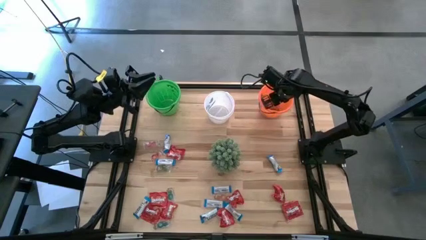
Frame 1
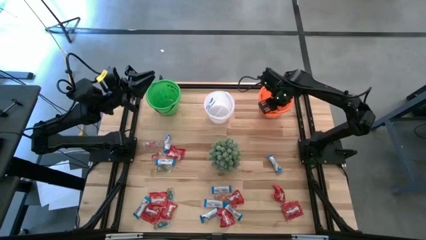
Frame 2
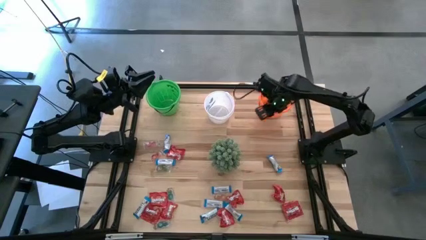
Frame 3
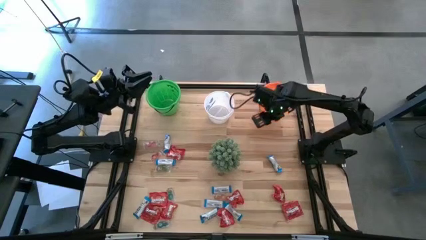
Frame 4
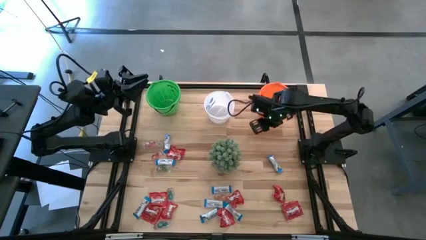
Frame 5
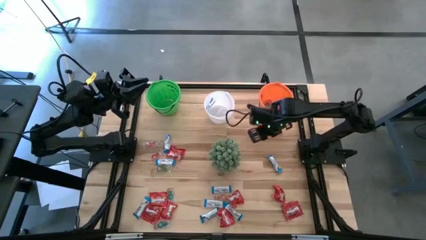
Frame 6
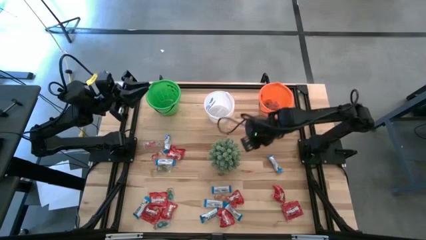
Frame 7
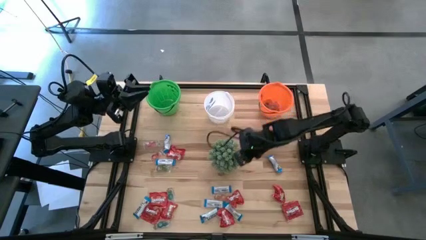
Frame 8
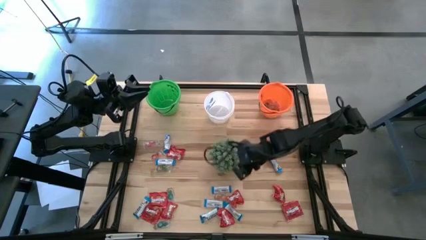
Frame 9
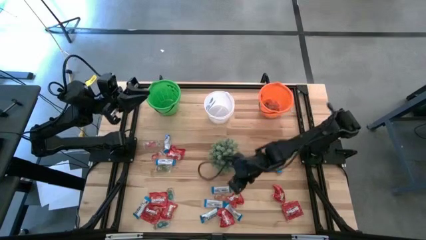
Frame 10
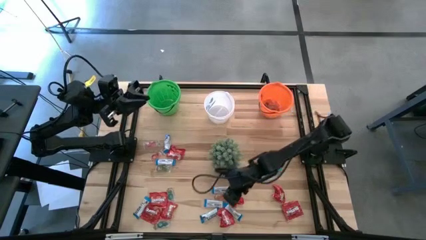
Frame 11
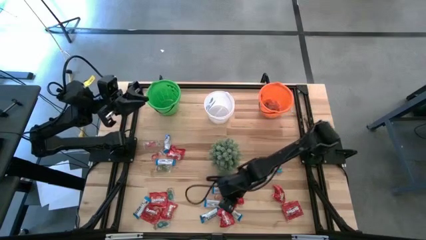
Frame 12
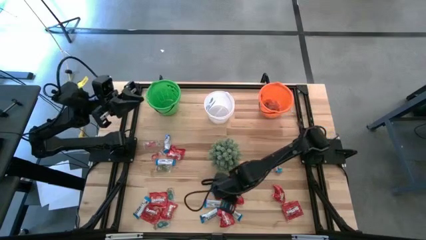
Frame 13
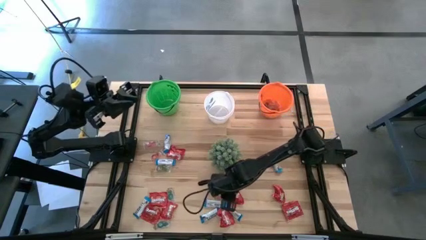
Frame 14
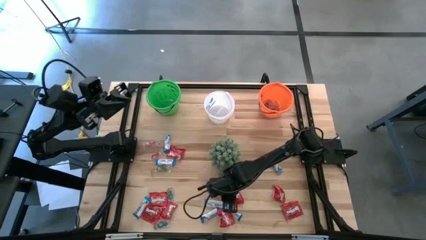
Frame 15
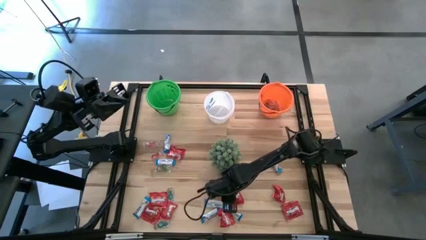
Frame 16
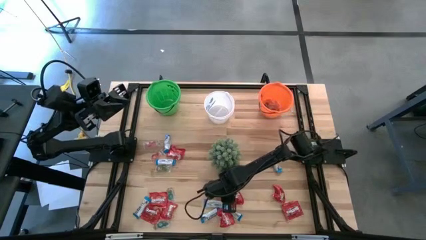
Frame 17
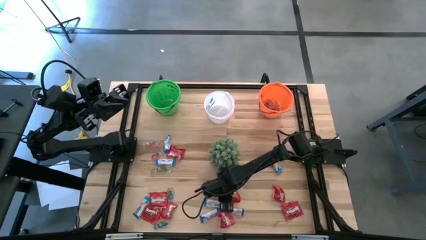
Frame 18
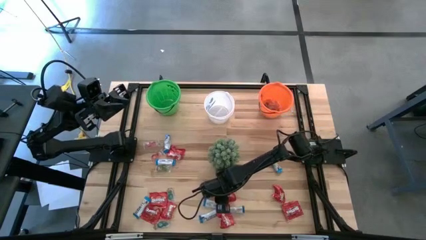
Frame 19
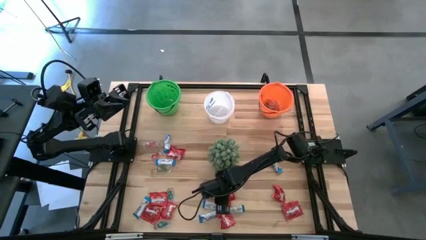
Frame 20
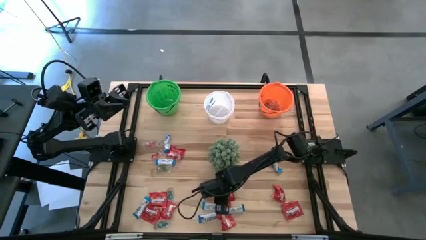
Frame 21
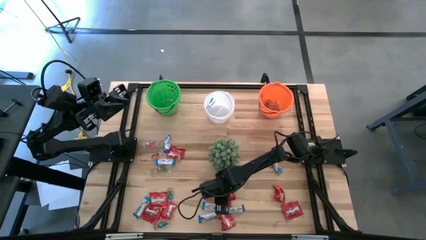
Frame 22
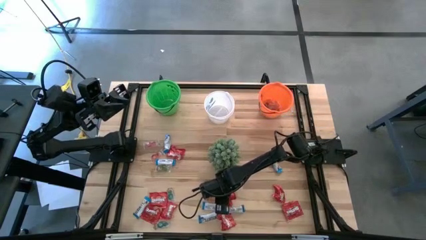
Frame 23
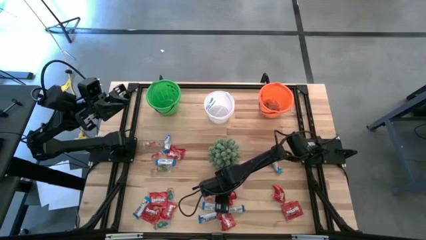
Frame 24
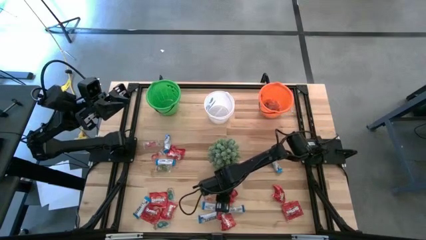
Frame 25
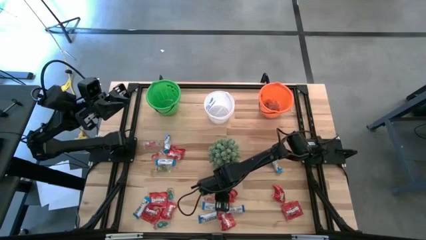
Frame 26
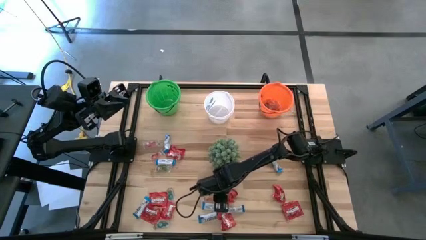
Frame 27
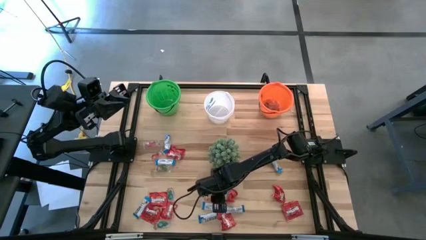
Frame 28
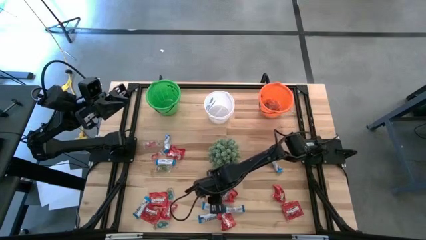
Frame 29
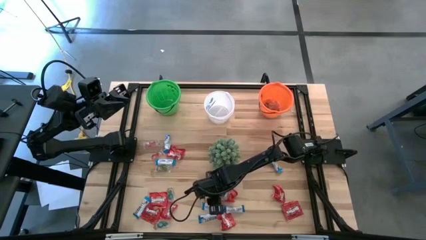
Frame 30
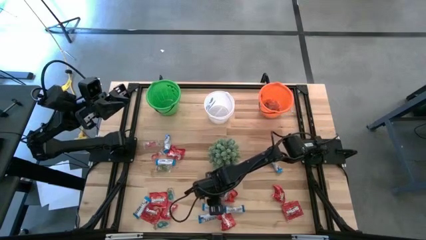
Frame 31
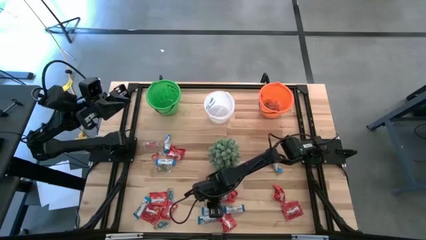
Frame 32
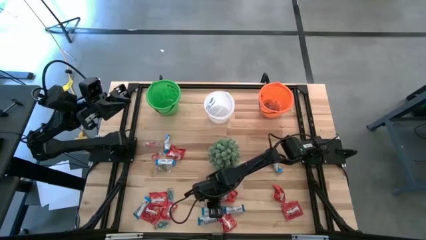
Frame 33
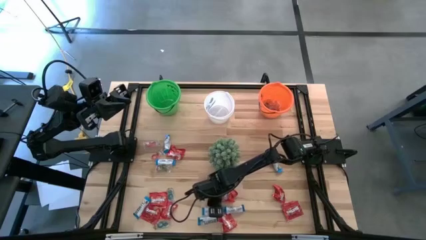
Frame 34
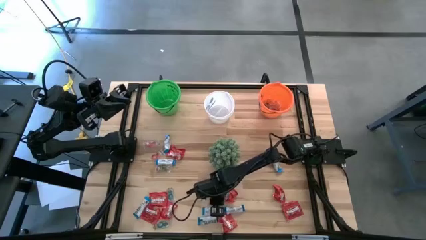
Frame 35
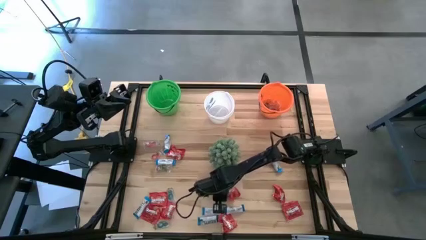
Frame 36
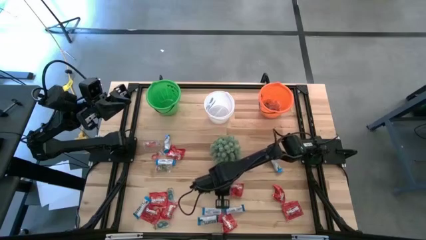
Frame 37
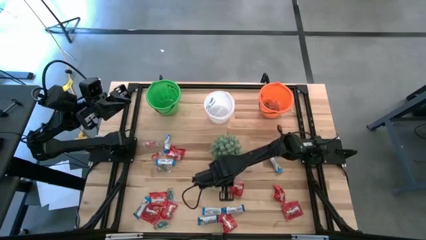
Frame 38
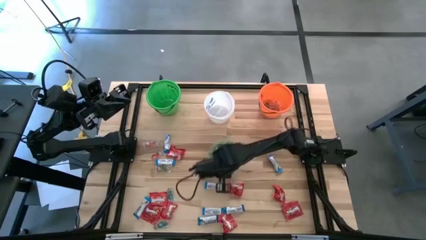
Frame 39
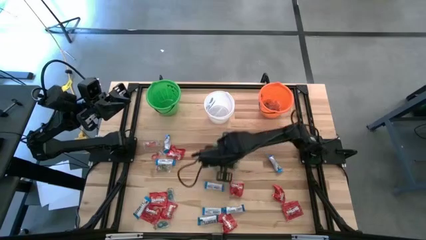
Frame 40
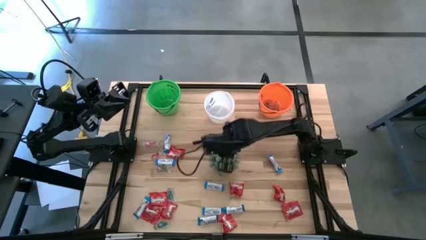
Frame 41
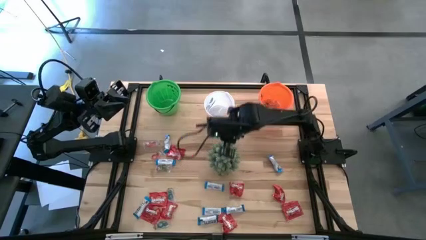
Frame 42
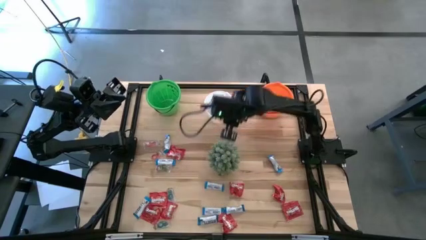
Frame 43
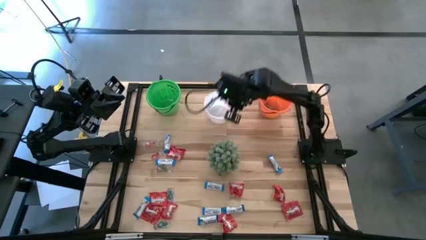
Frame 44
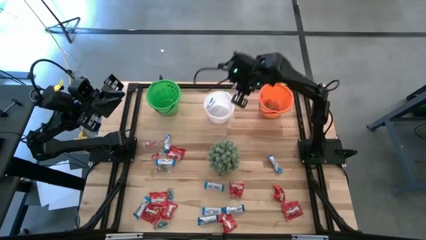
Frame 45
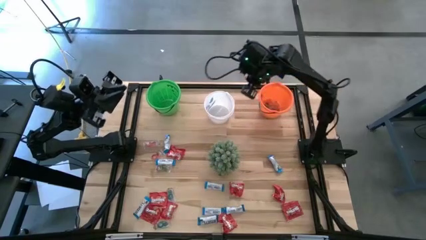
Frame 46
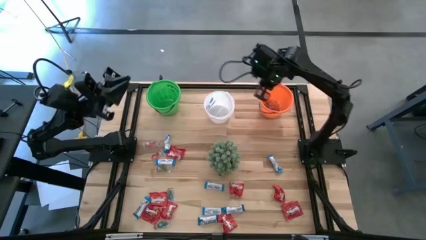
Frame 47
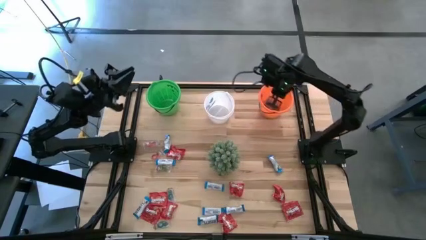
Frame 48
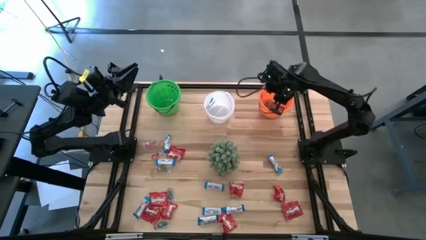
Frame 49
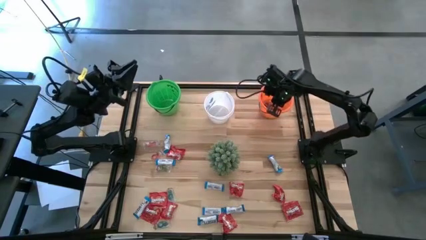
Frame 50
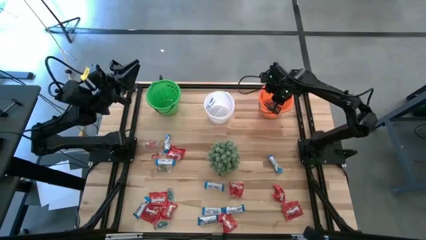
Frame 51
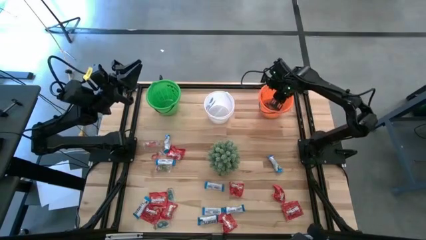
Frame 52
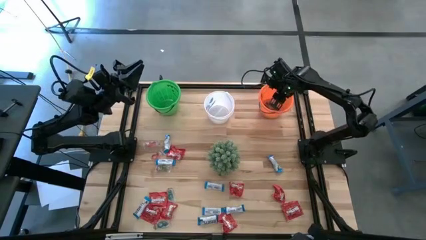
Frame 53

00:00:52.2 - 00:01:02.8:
Task: Sort candy
Put the transparent candy into the orange bucket

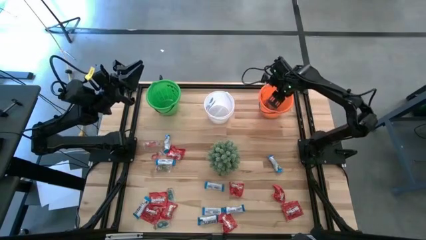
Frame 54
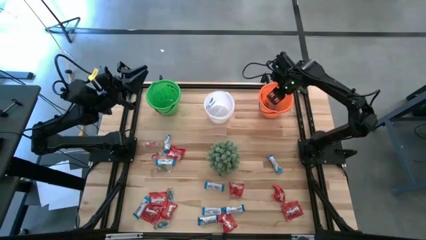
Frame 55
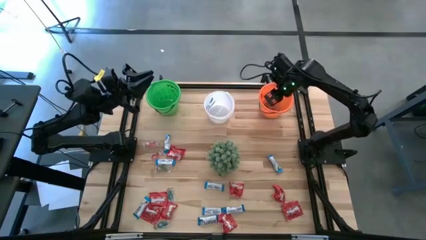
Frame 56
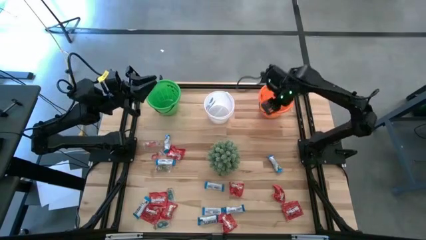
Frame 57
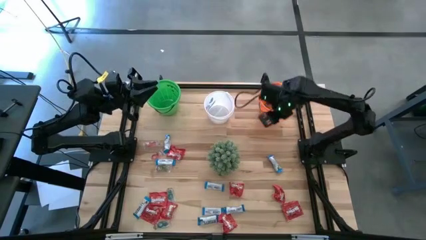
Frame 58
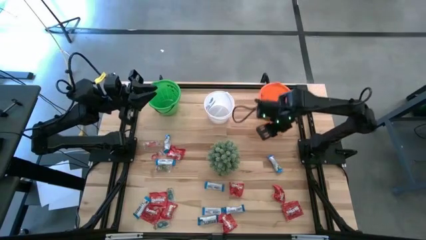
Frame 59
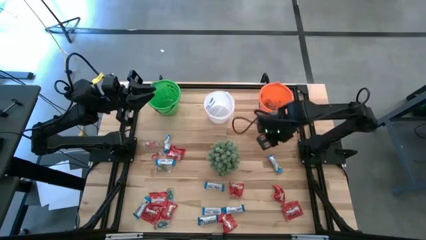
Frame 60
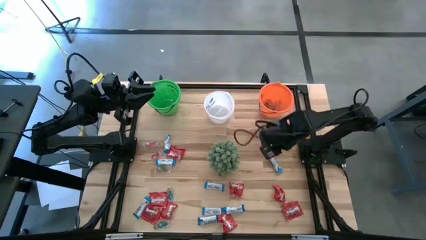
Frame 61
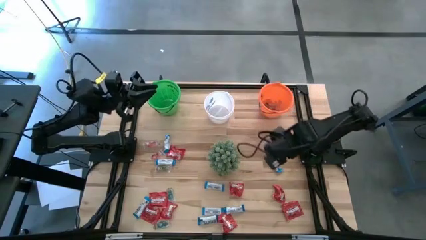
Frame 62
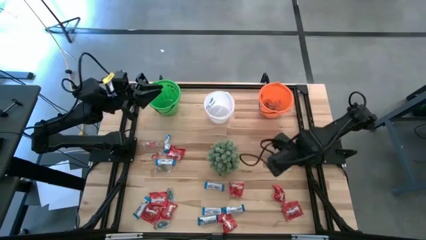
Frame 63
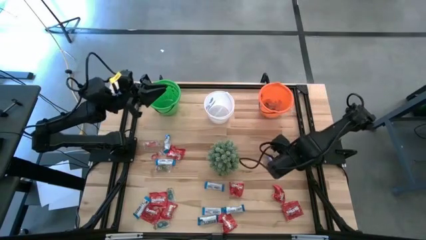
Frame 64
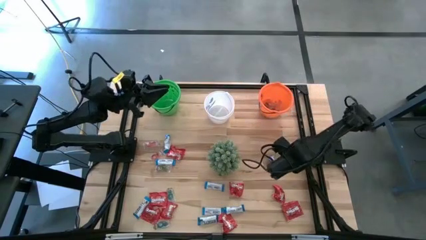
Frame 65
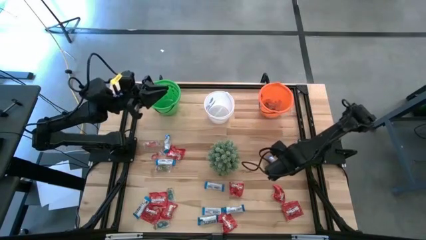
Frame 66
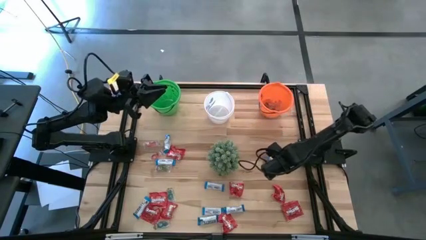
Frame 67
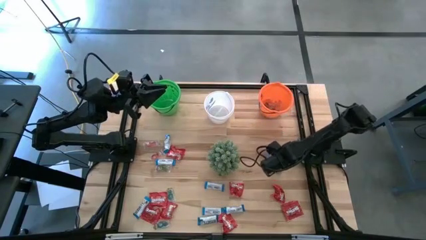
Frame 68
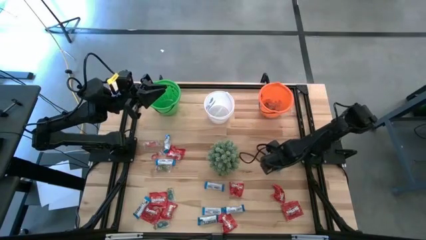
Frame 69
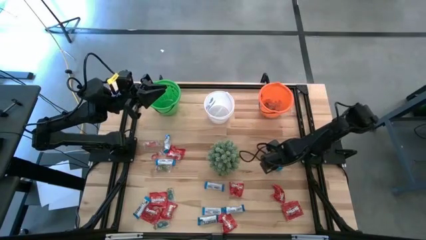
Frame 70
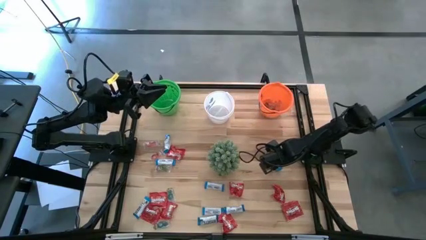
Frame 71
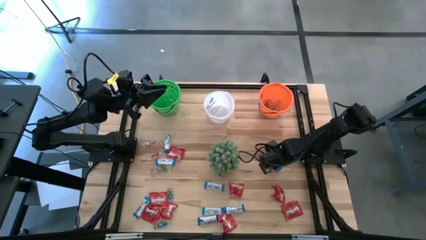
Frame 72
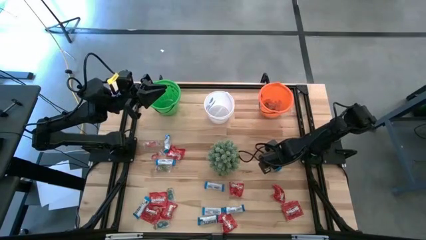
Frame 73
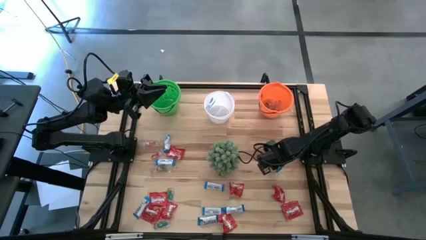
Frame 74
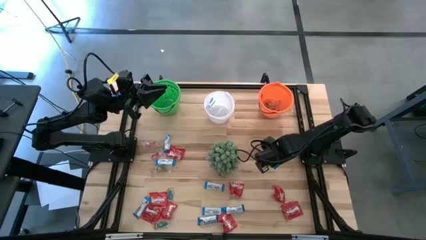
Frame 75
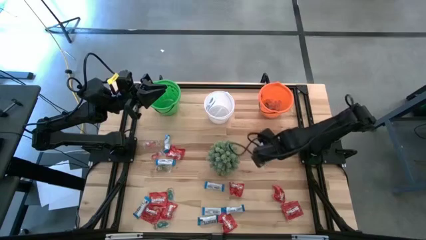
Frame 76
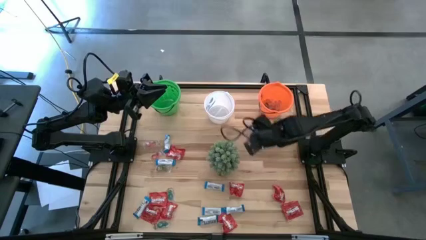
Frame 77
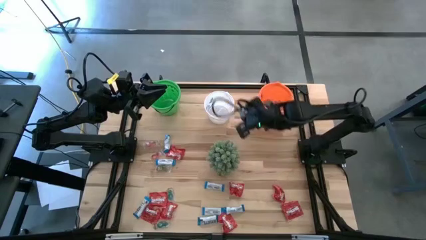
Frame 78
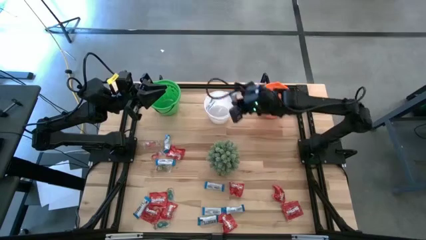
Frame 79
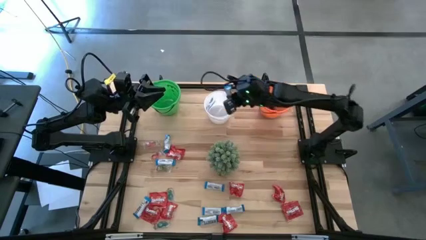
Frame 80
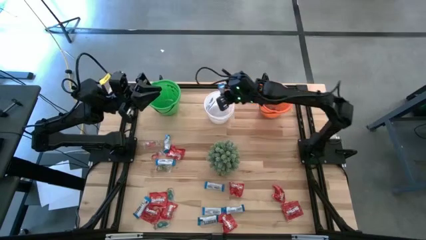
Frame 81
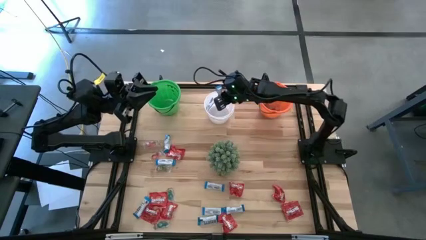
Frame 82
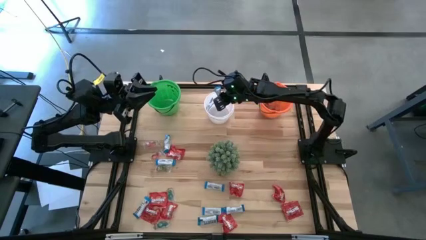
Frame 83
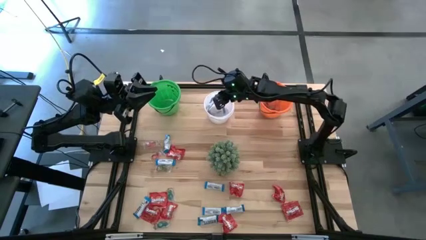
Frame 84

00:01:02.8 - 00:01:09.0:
Put the white chocolate bars into the white bucket
